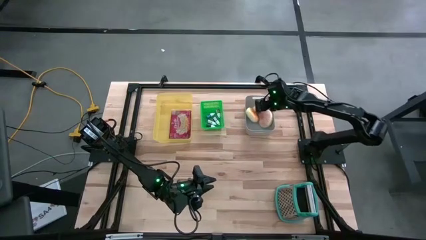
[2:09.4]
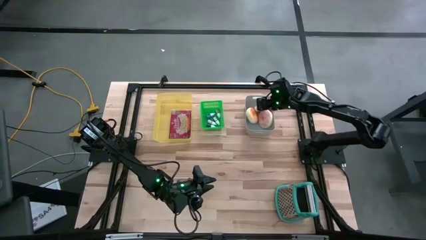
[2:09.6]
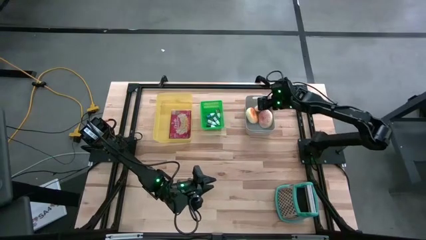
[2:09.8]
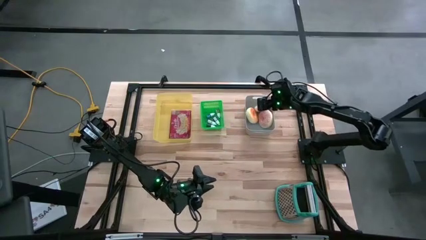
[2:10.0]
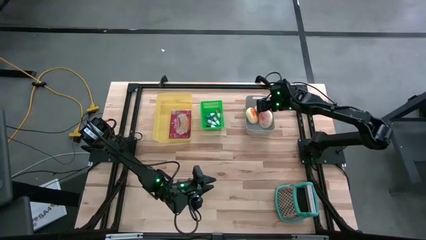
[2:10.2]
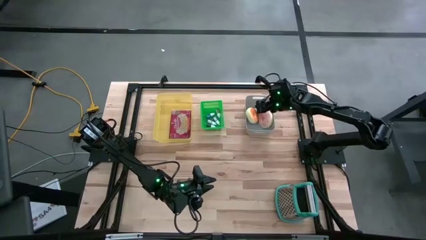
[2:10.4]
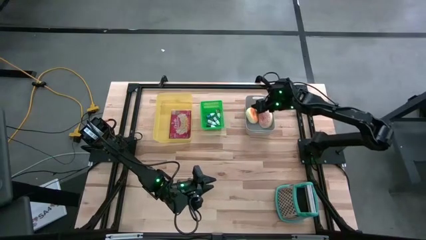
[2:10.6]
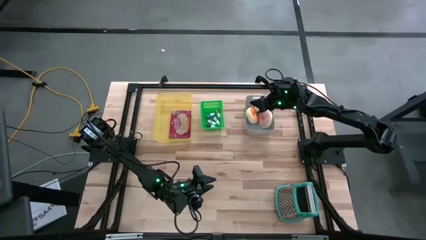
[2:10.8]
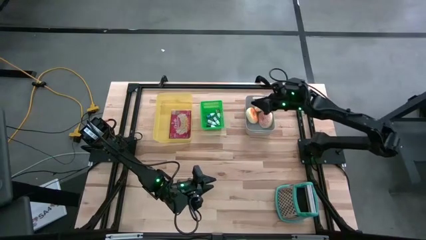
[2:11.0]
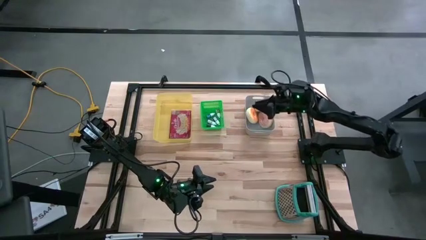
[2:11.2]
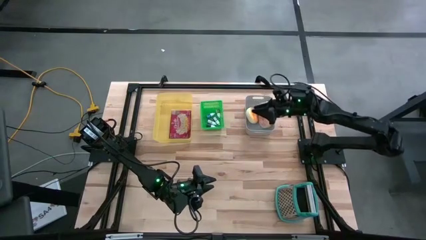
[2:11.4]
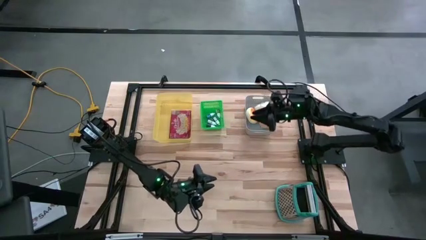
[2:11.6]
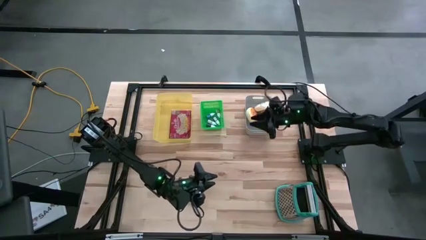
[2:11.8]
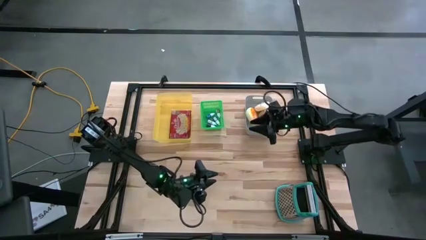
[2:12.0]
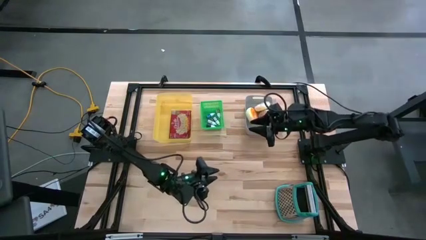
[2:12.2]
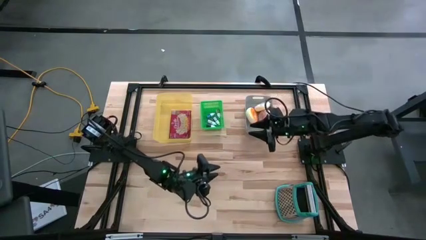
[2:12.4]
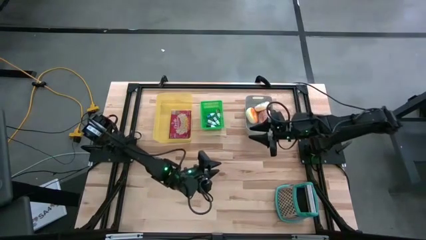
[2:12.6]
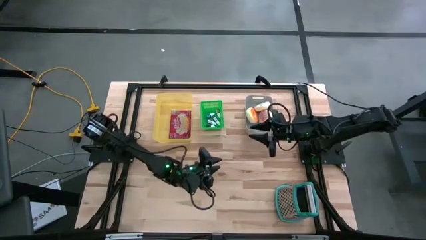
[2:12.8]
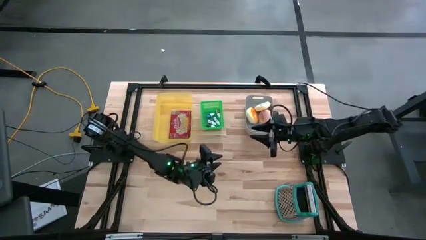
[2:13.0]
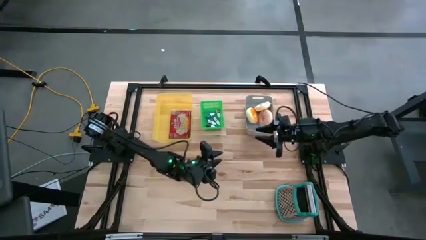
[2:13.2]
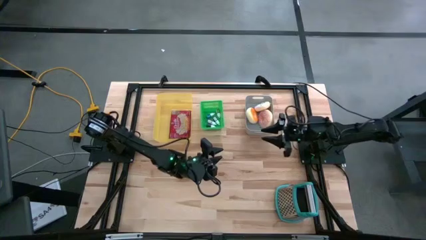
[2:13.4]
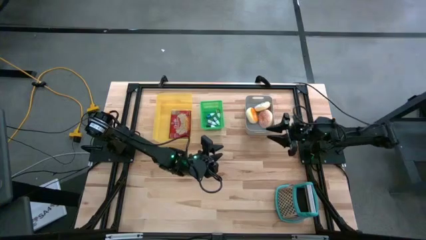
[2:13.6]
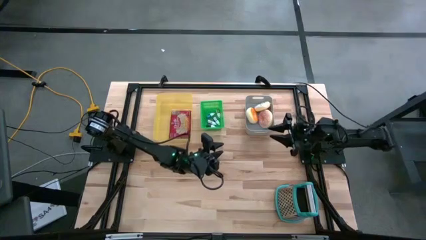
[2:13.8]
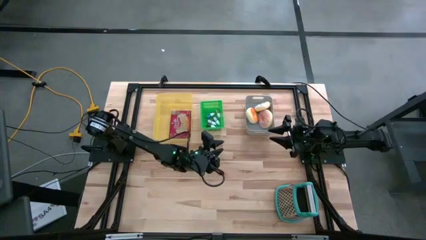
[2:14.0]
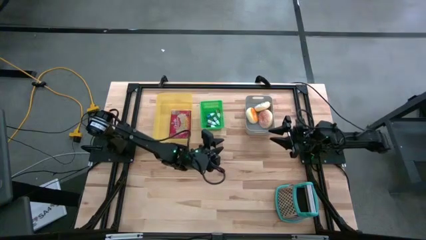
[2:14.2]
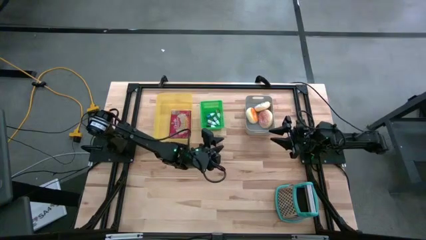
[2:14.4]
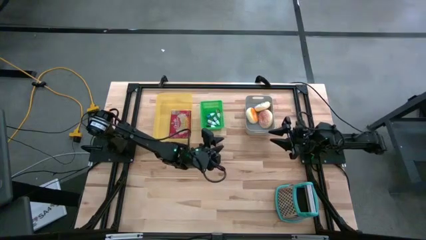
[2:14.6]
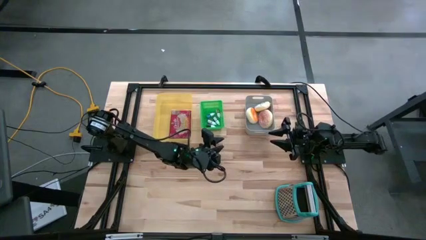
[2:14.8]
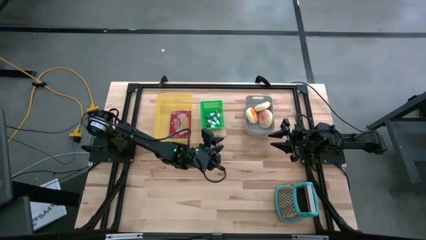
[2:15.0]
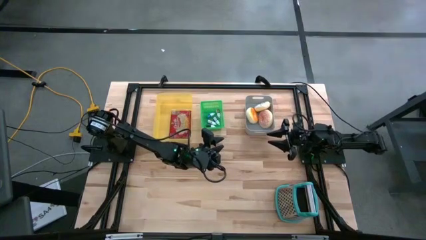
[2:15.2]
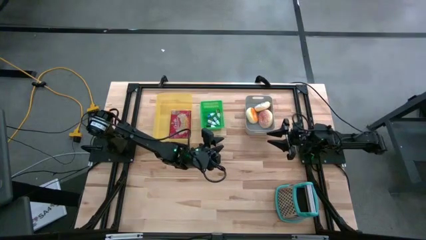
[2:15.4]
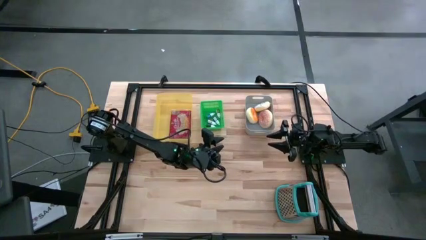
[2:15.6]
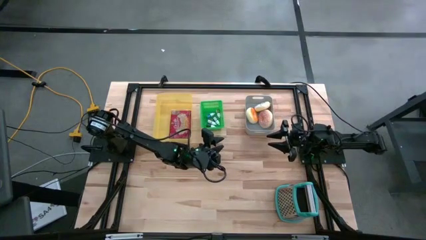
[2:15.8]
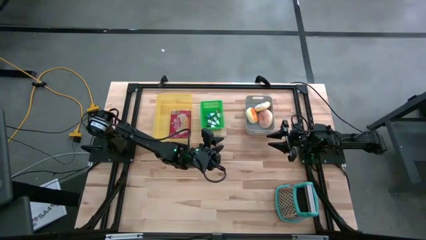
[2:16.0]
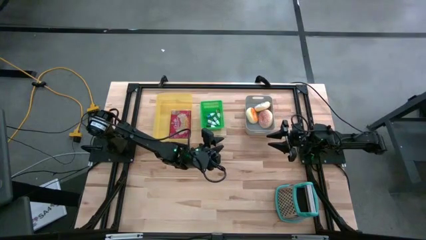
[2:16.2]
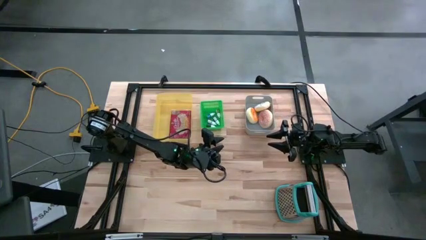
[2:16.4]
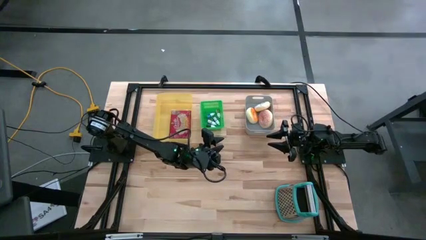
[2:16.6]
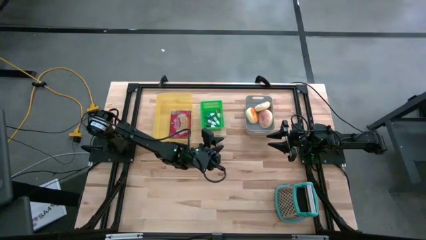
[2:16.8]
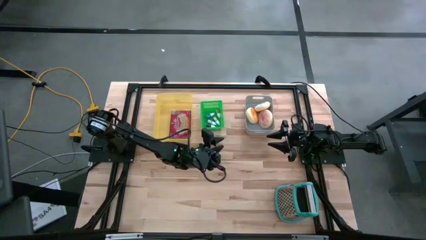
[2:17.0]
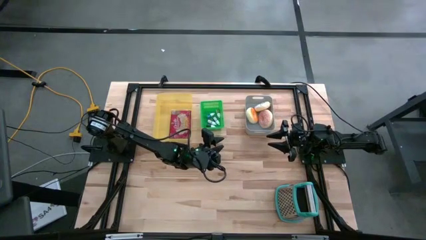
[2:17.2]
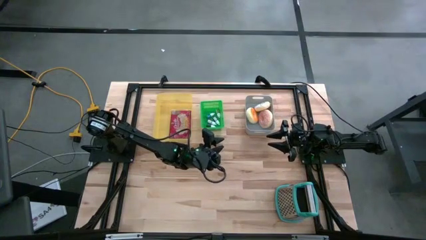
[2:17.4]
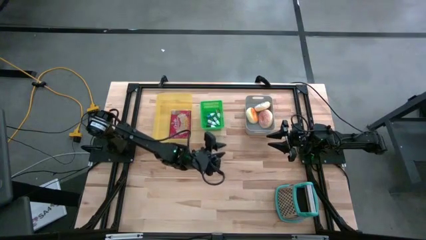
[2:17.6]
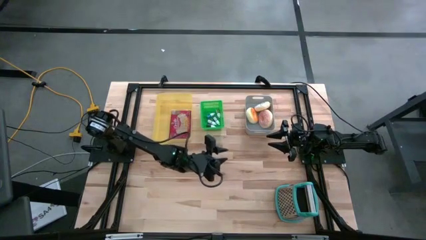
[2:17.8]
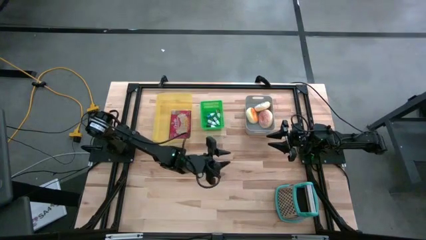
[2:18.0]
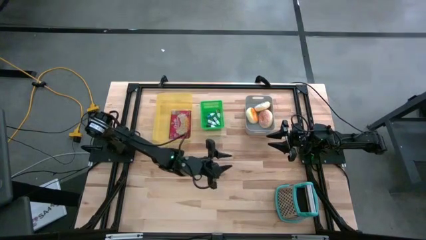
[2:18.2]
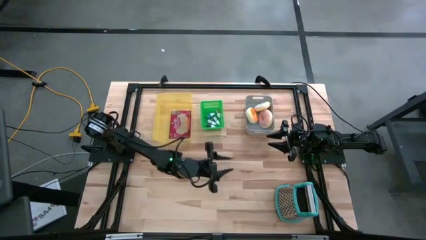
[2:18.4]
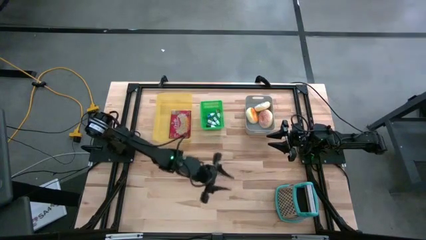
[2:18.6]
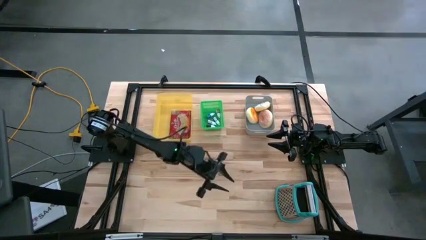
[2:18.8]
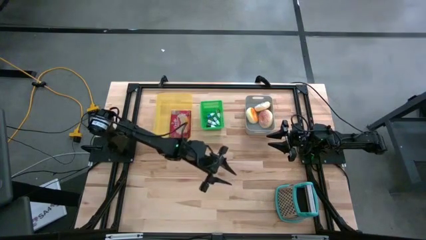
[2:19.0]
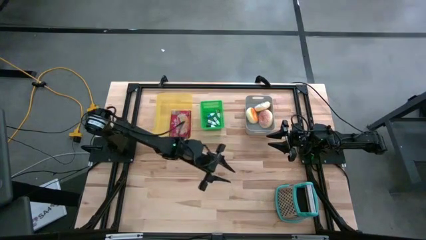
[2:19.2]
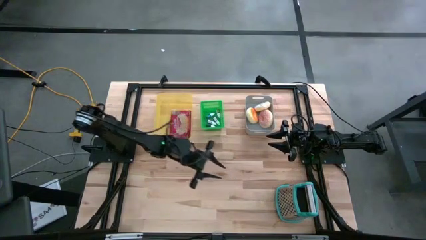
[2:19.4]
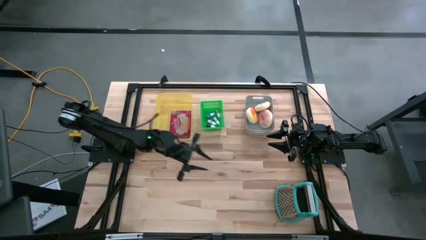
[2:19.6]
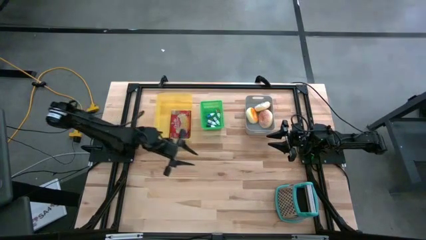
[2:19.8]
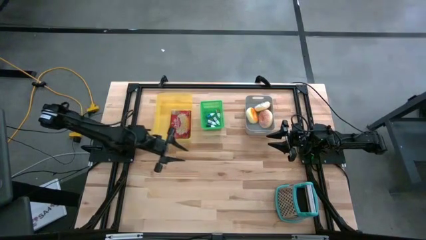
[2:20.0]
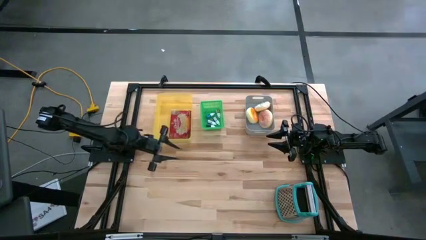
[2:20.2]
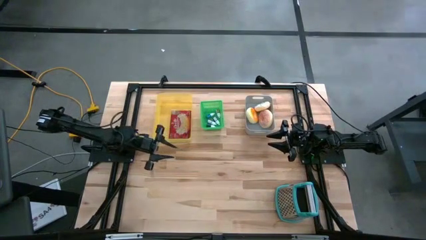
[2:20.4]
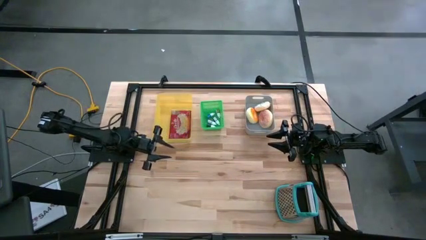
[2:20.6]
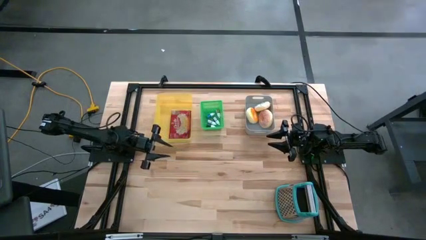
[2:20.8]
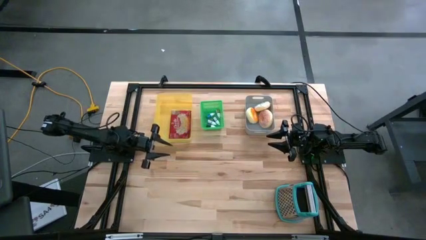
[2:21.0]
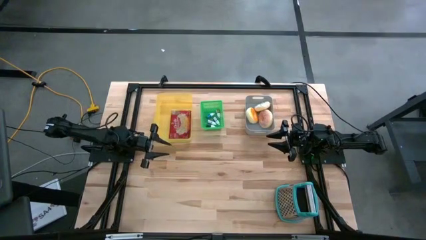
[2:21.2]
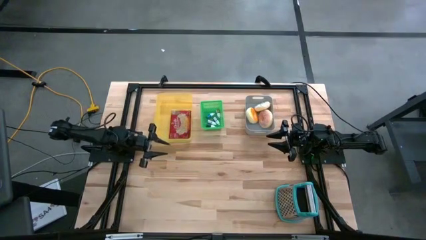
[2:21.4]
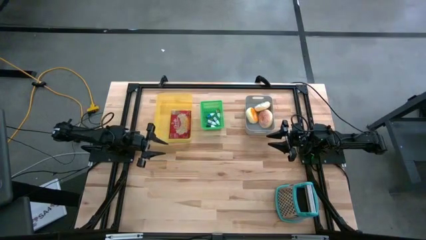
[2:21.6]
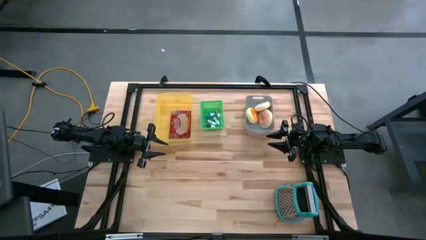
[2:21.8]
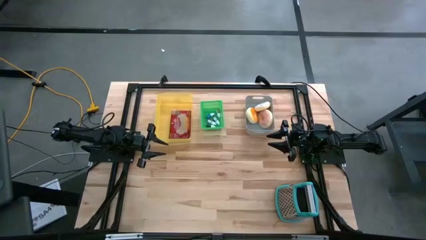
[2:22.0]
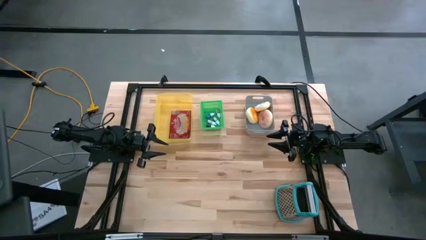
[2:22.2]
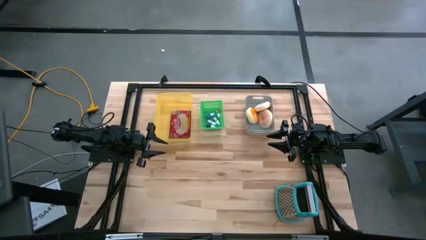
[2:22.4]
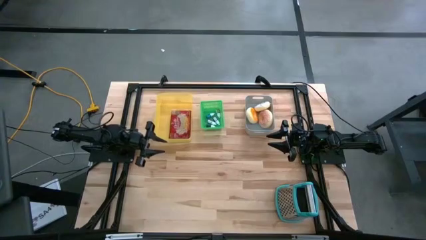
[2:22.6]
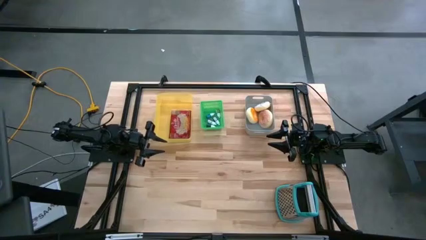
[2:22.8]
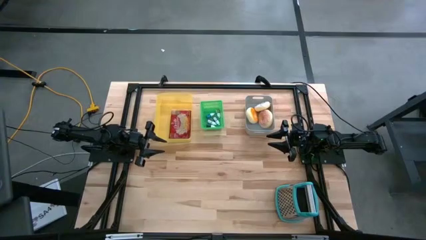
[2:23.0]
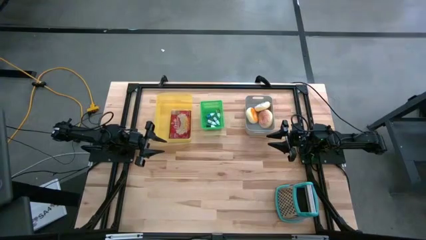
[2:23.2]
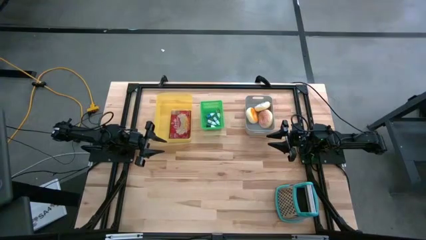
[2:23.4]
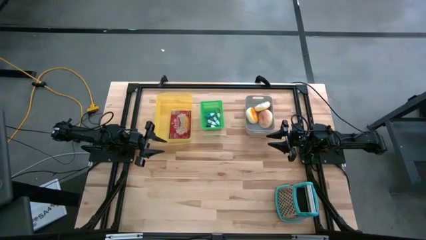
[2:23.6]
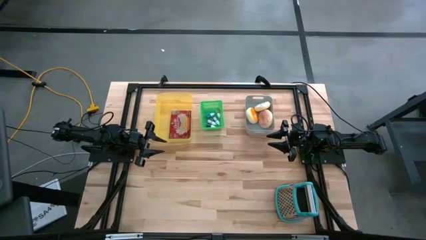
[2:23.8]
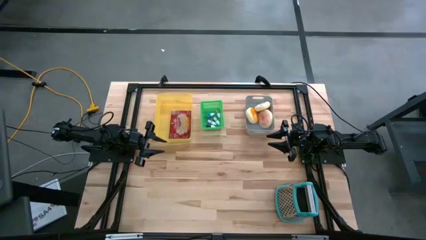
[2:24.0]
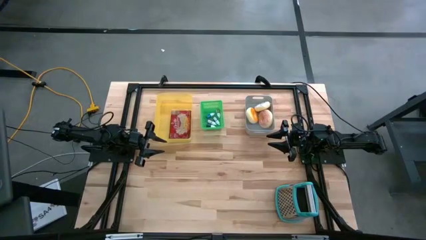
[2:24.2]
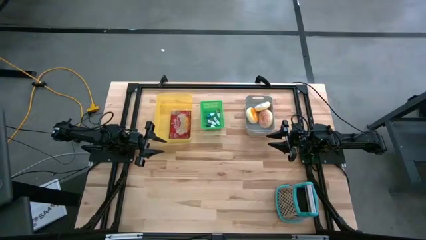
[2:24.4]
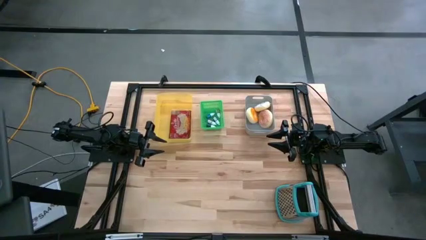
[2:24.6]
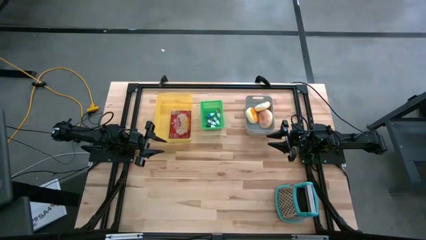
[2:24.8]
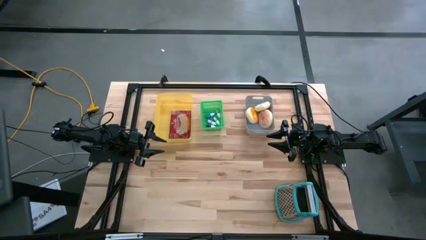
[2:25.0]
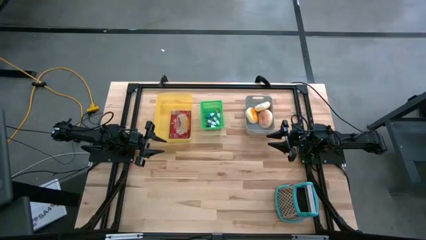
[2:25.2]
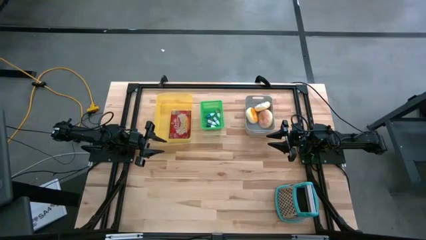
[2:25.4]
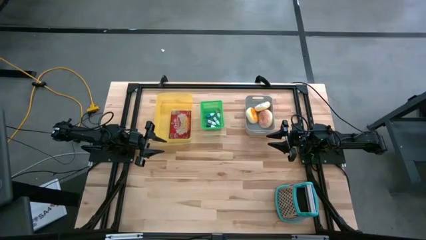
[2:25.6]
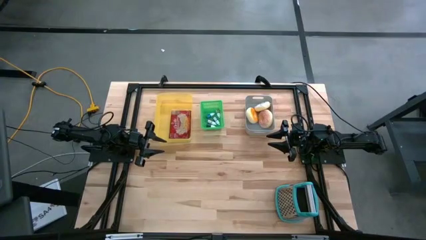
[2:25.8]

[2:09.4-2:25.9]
Return to Home Position
